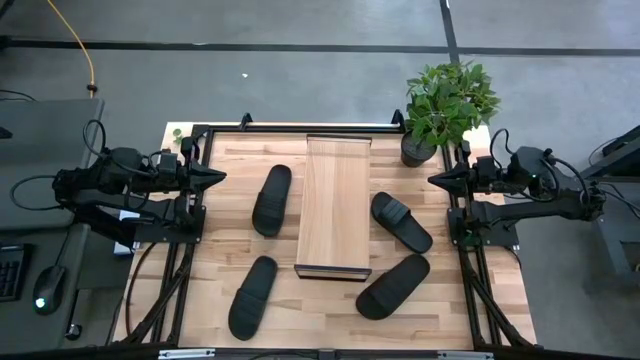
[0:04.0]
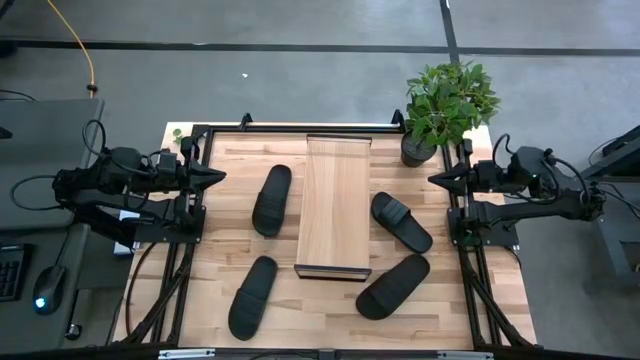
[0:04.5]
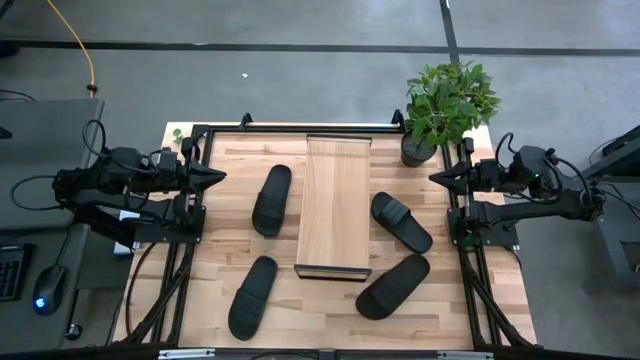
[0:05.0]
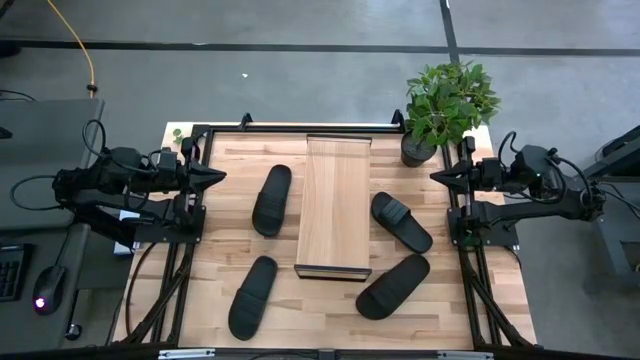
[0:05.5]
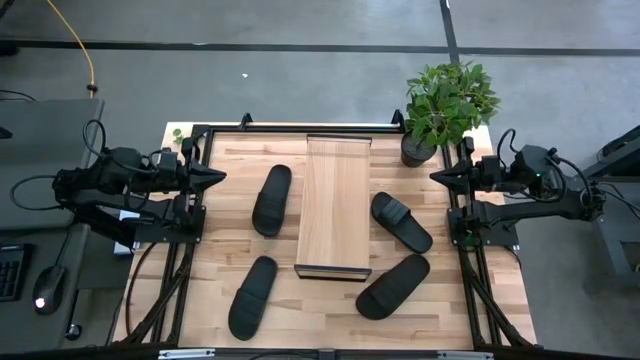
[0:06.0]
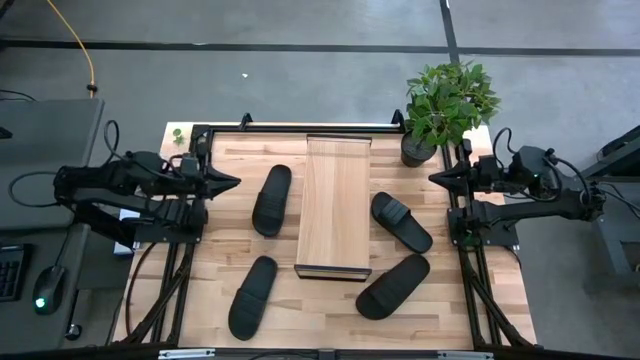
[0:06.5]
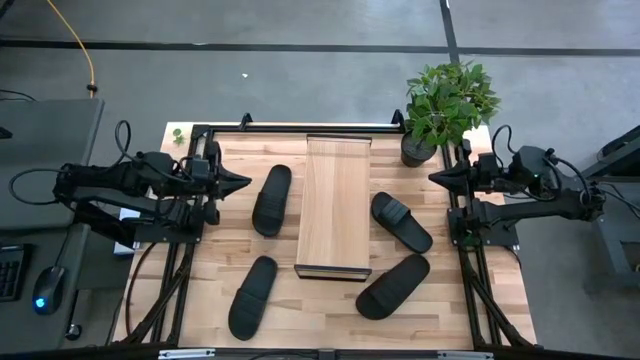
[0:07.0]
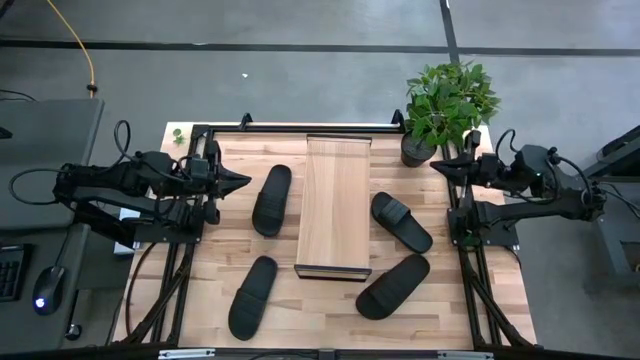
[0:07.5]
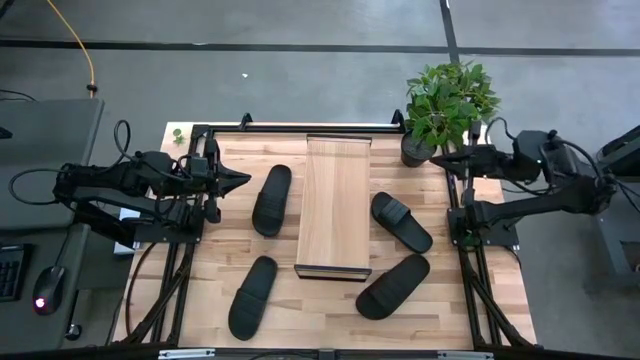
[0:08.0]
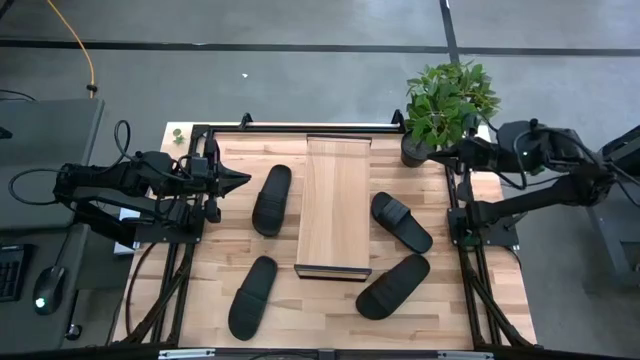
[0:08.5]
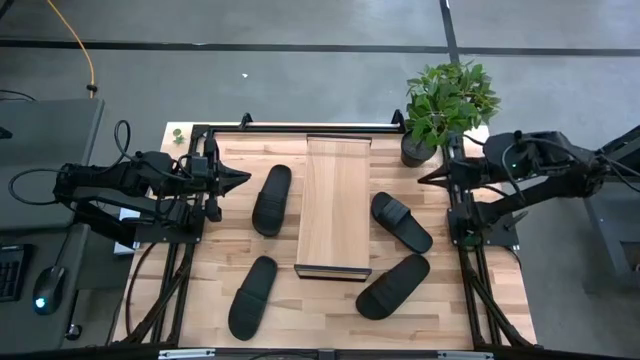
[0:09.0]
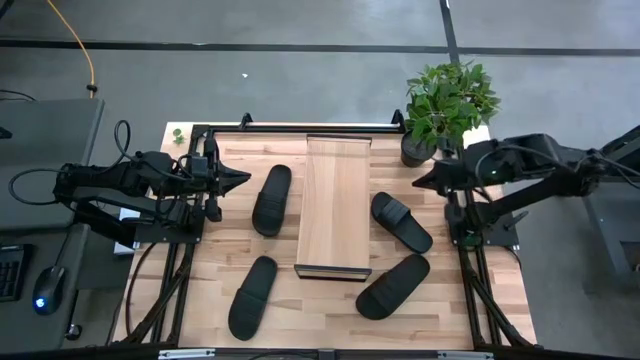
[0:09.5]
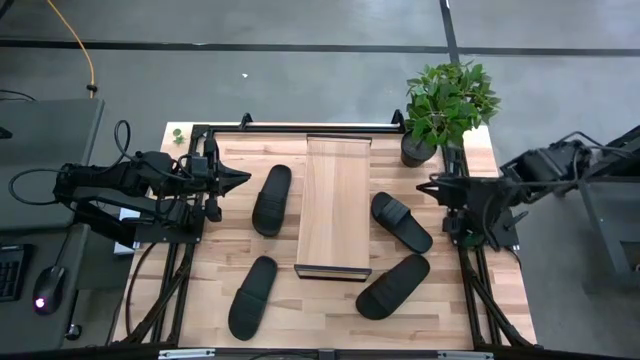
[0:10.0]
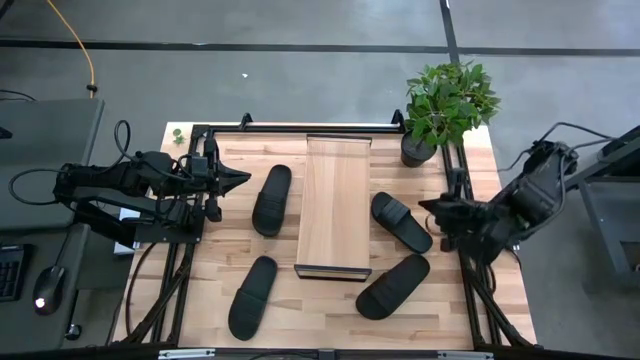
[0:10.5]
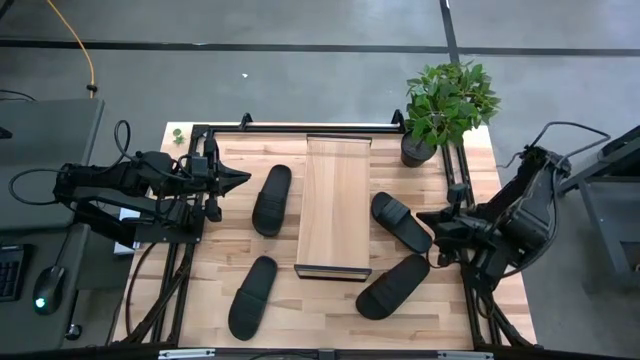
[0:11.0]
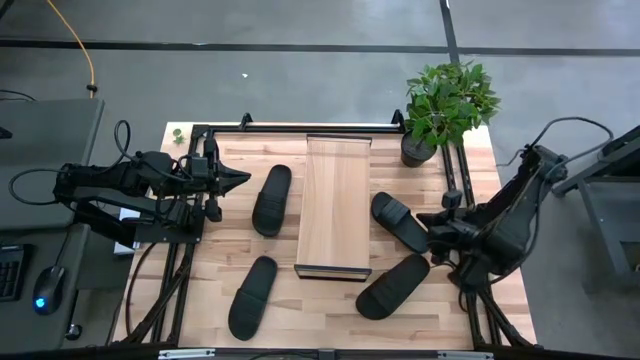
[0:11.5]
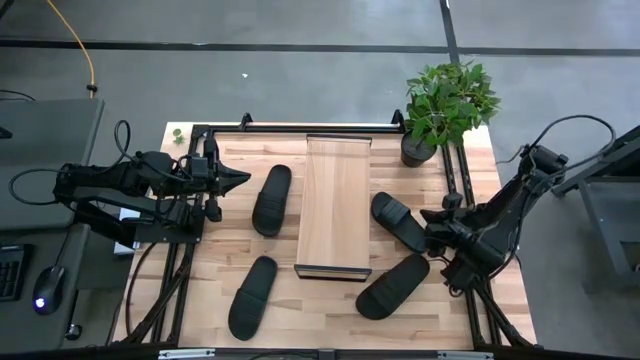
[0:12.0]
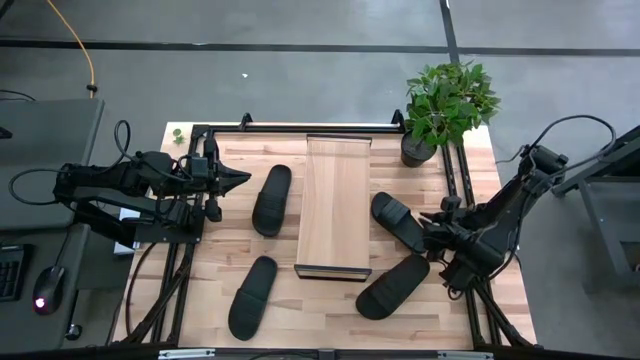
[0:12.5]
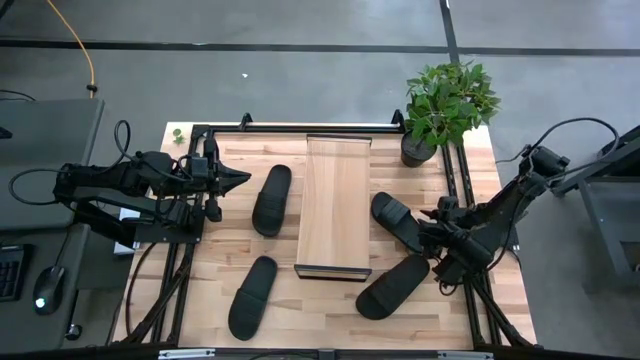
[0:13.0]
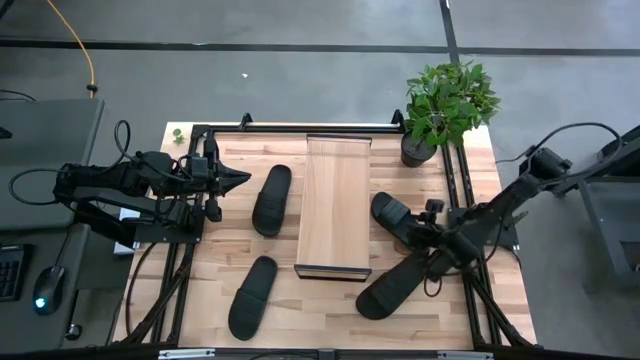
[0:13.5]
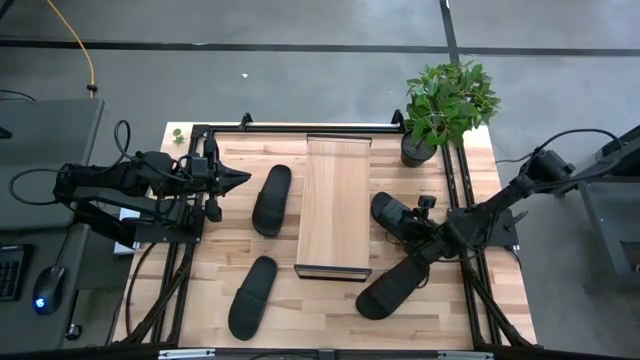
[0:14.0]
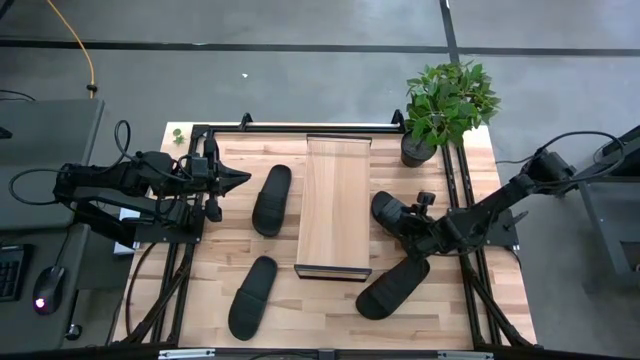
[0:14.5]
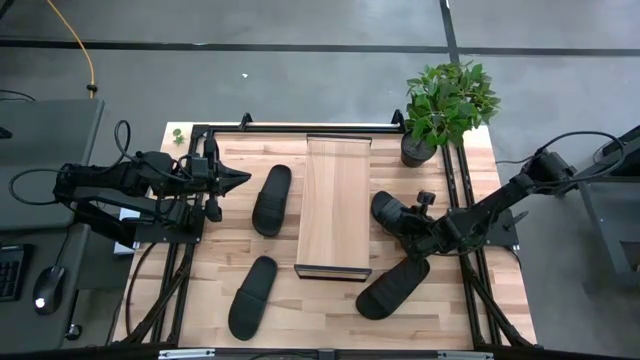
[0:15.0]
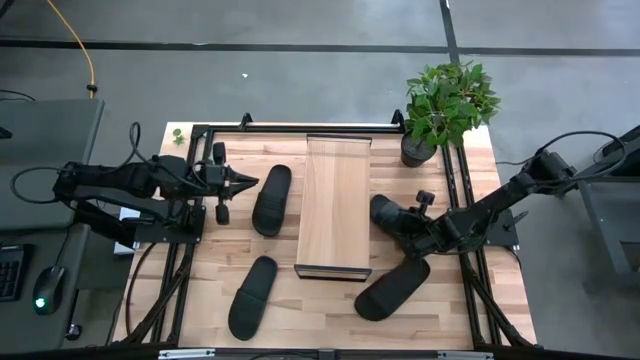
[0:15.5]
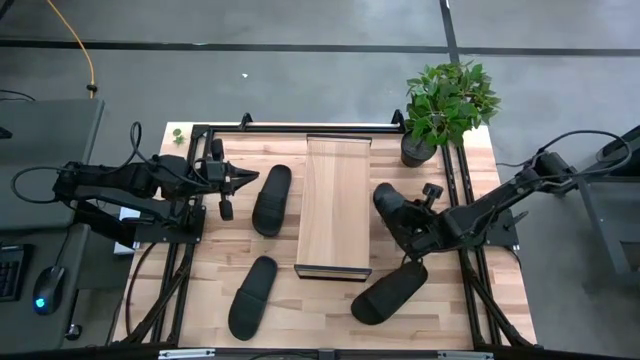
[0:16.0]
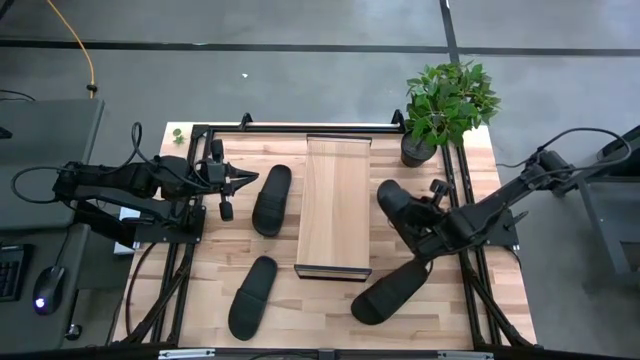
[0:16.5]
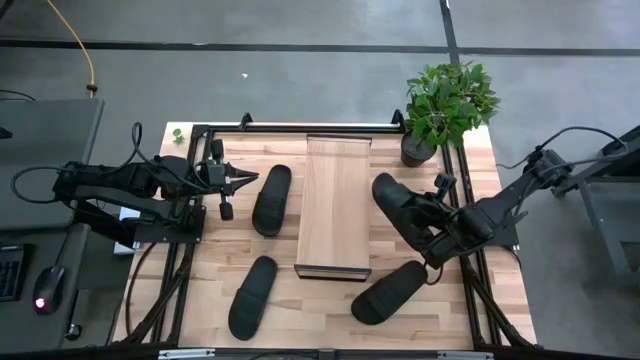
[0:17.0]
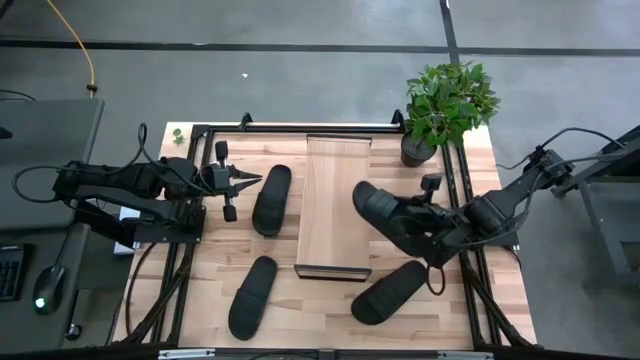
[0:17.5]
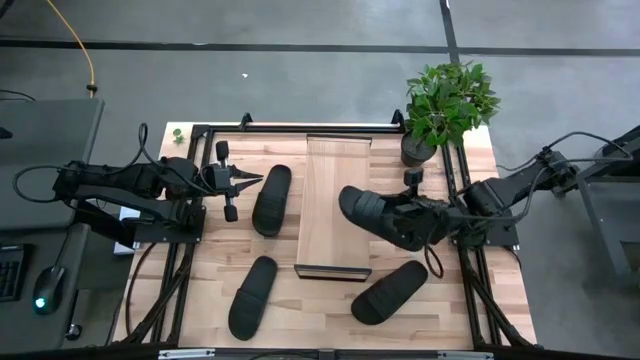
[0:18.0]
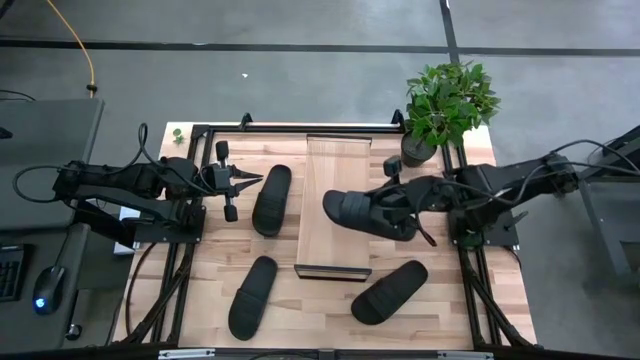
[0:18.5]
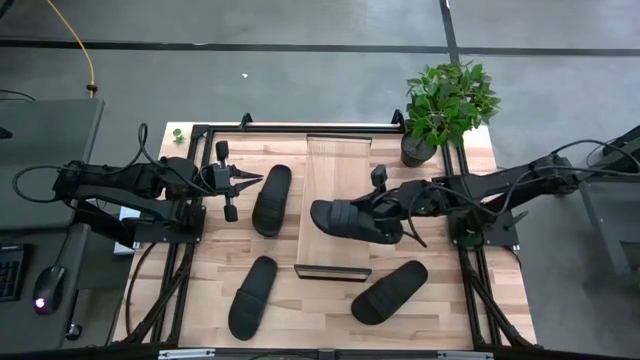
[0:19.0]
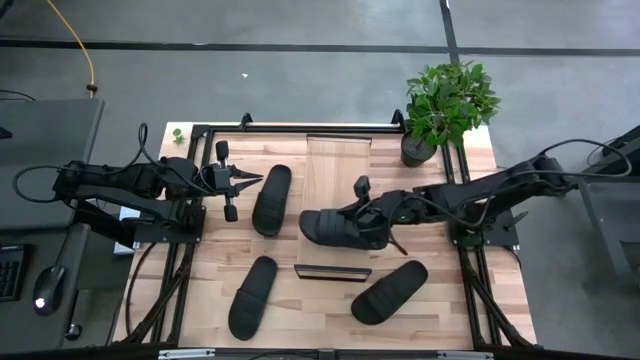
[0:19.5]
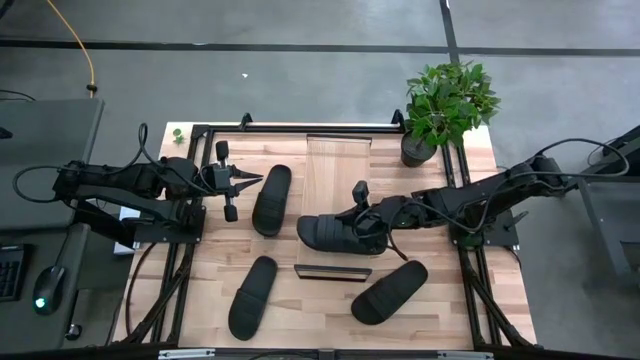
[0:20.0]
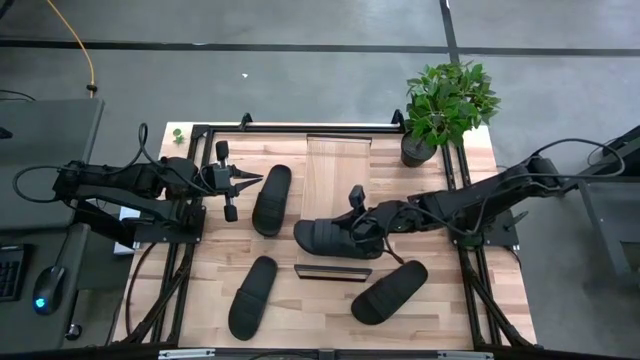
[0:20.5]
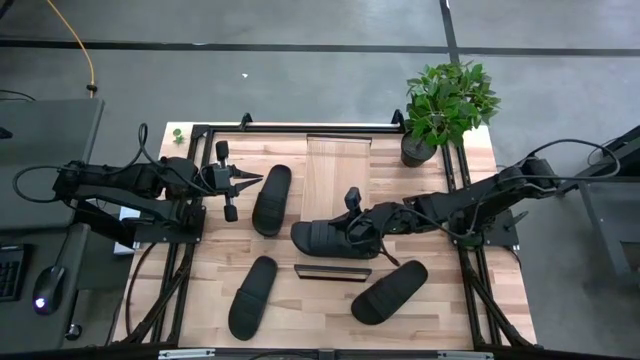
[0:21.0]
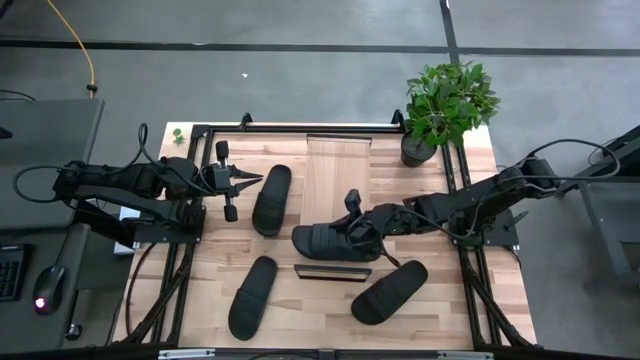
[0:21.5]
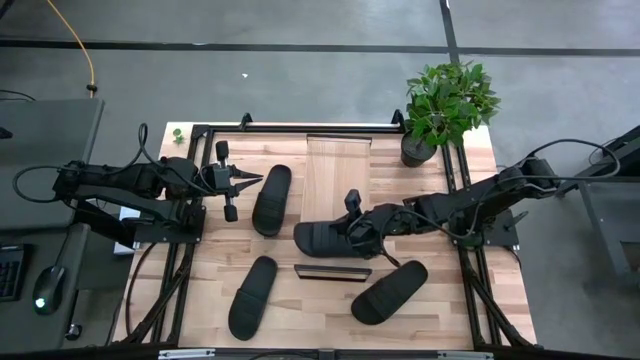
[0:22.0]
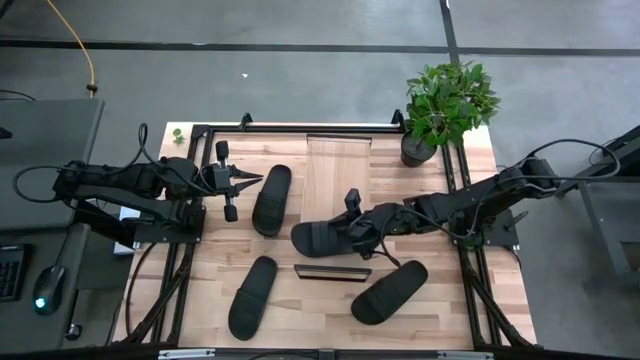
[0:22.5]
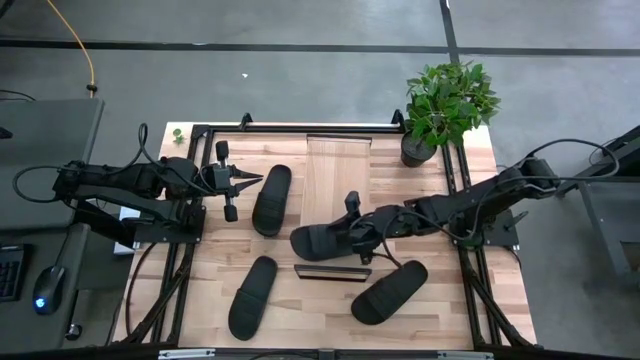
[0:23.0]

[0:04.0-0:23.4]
Task: Pick and place slides into the shelf
Put the top right black slipper on the shelf
